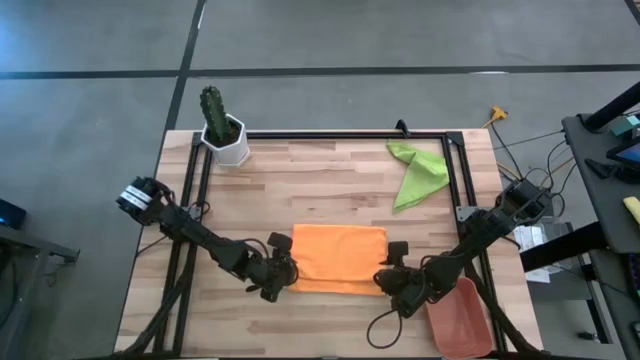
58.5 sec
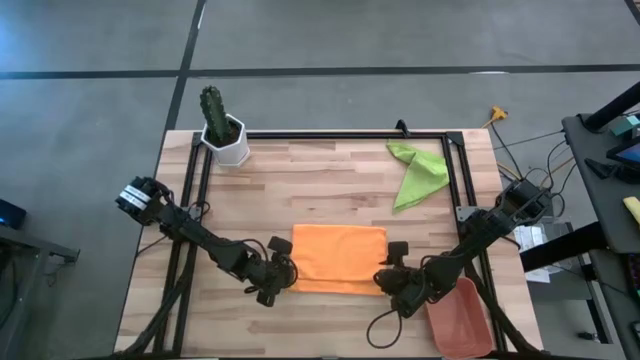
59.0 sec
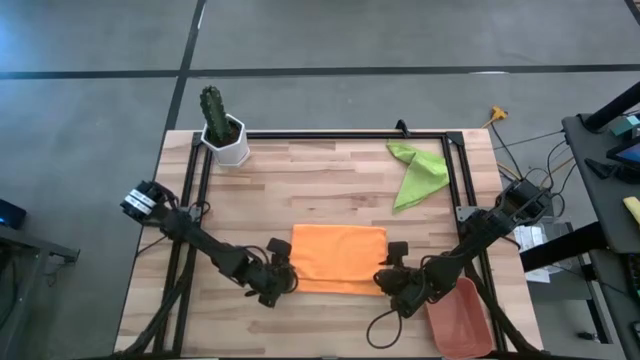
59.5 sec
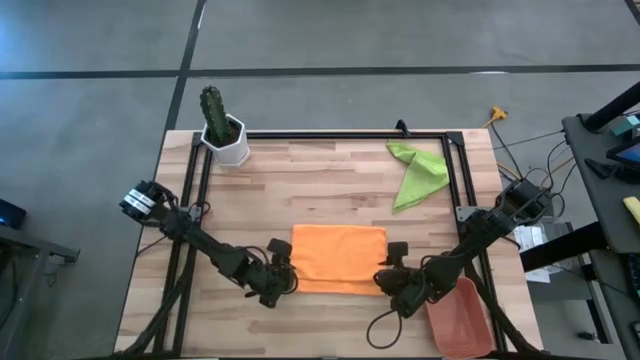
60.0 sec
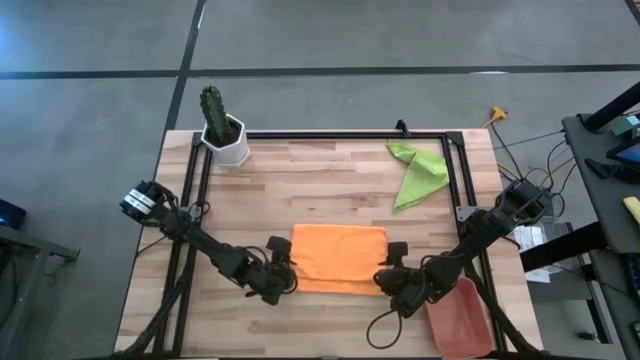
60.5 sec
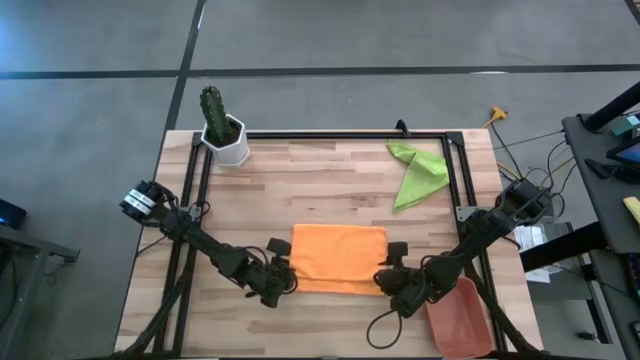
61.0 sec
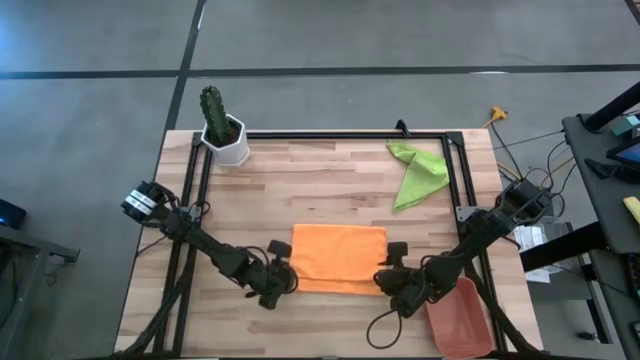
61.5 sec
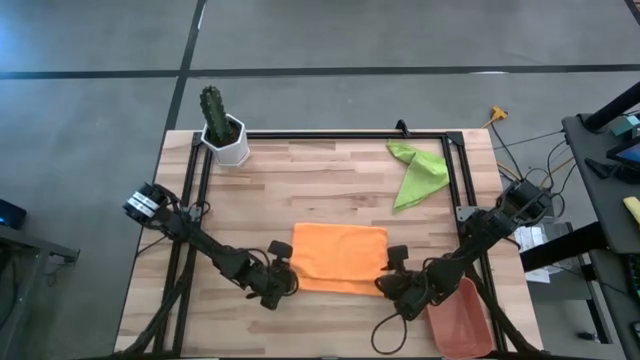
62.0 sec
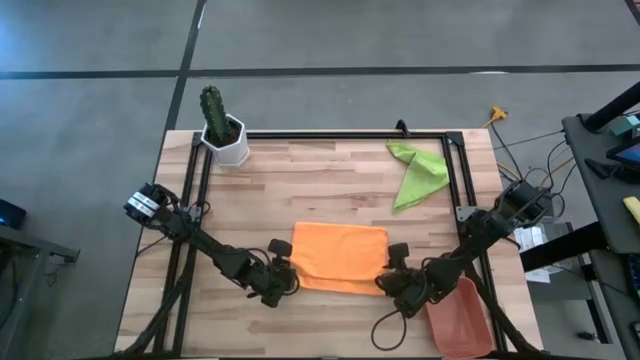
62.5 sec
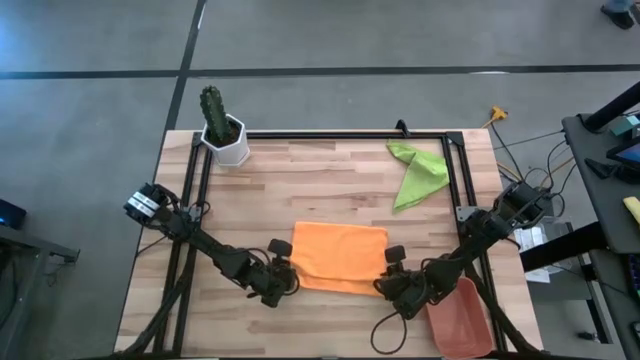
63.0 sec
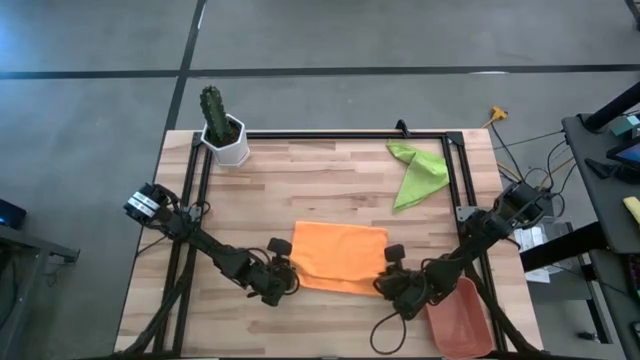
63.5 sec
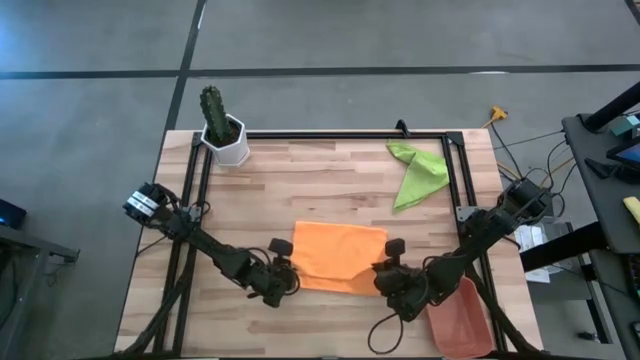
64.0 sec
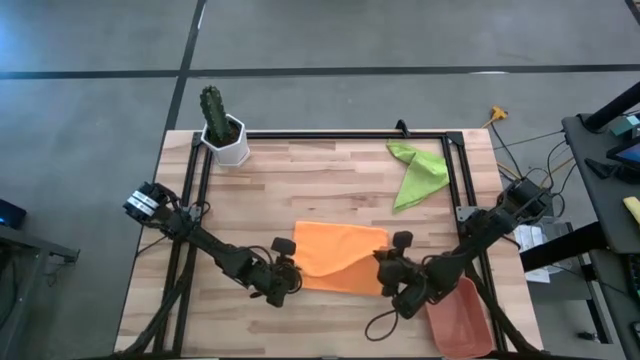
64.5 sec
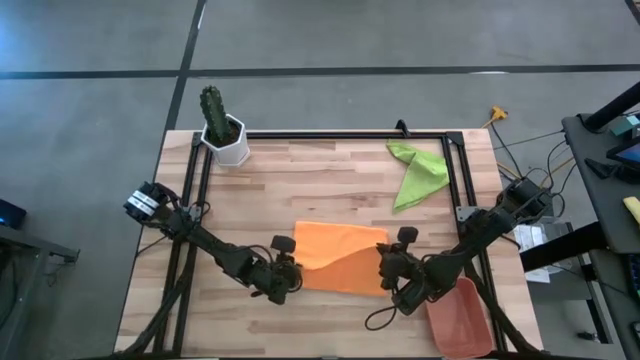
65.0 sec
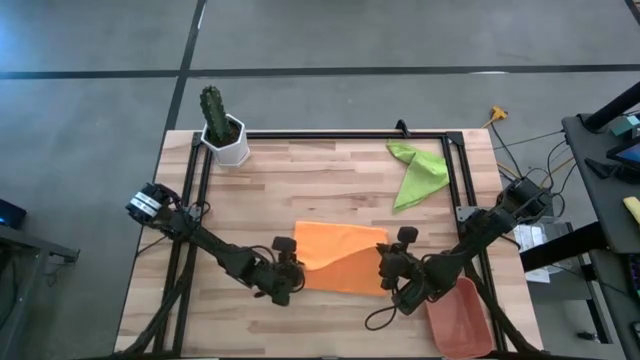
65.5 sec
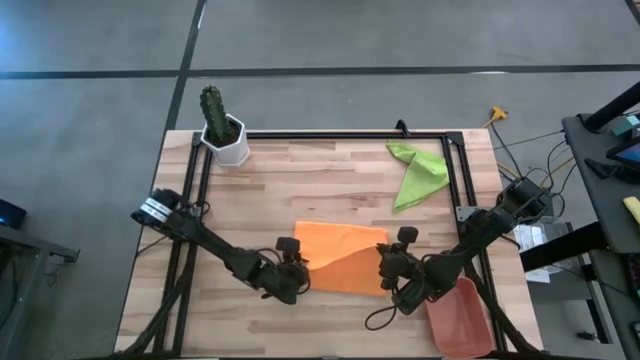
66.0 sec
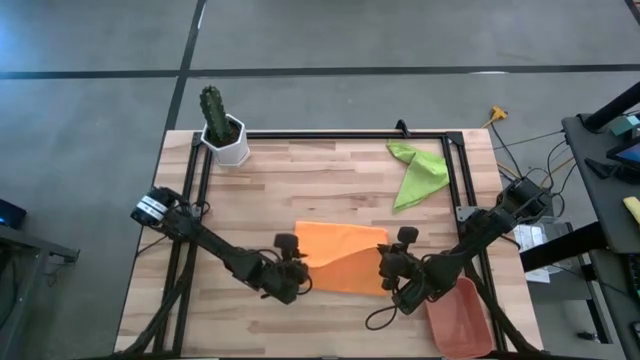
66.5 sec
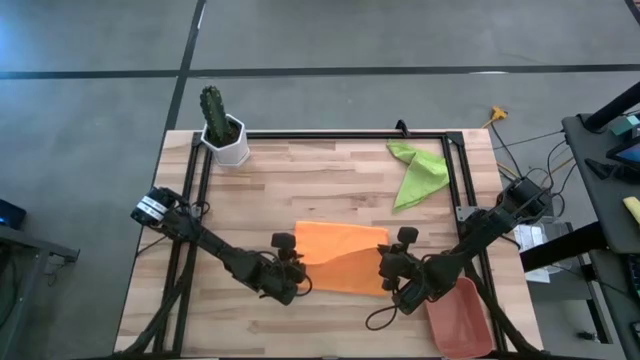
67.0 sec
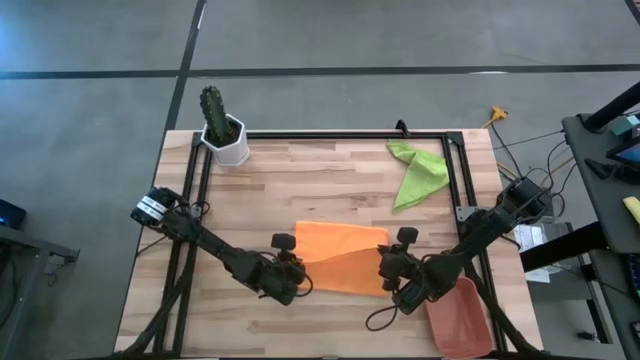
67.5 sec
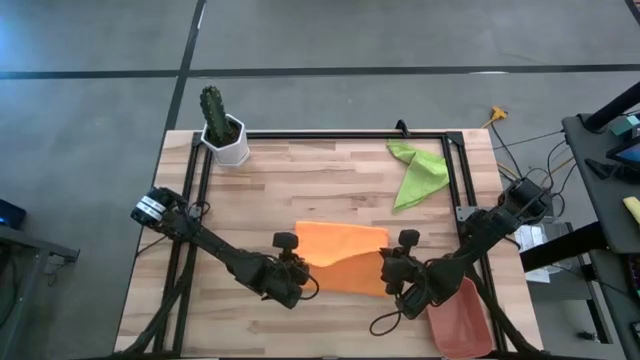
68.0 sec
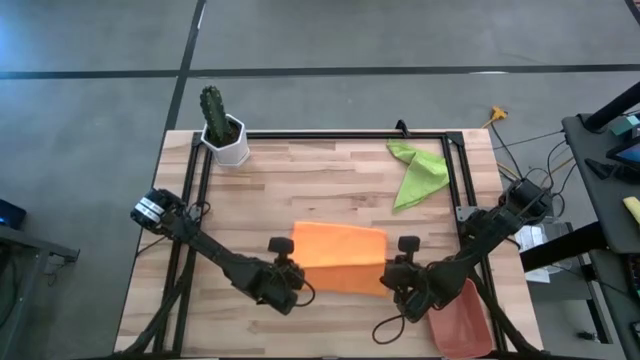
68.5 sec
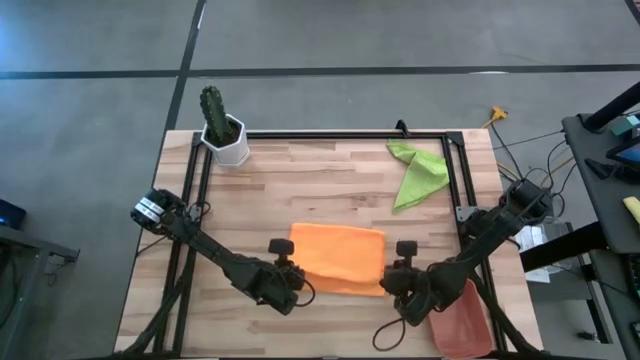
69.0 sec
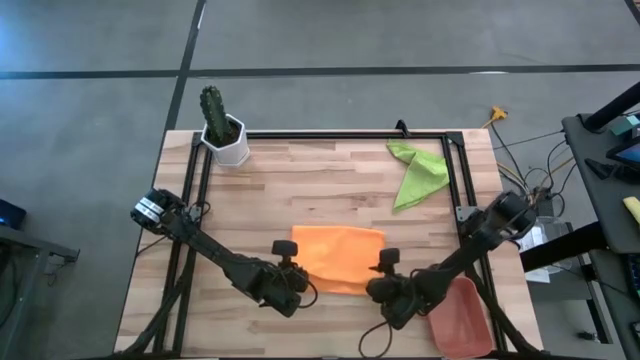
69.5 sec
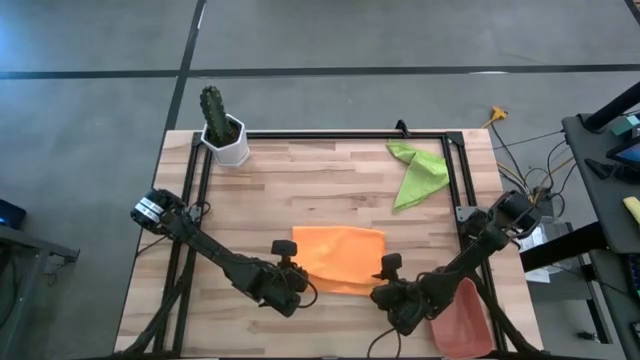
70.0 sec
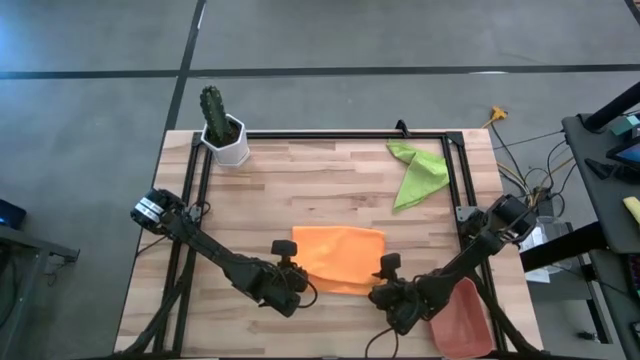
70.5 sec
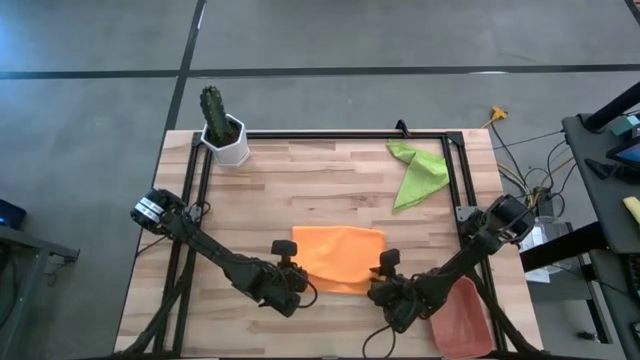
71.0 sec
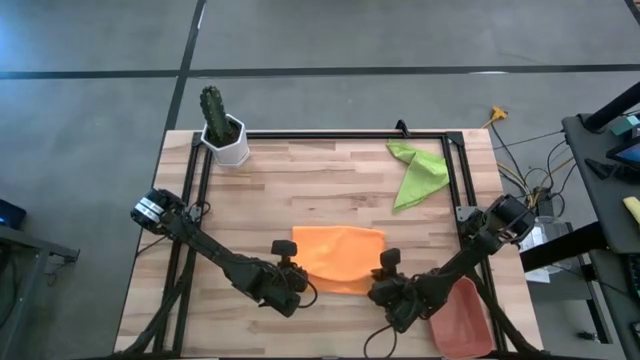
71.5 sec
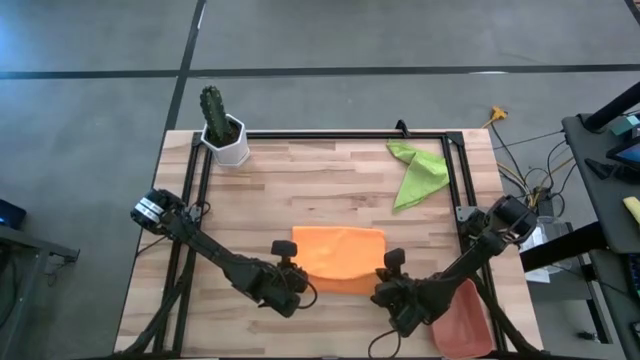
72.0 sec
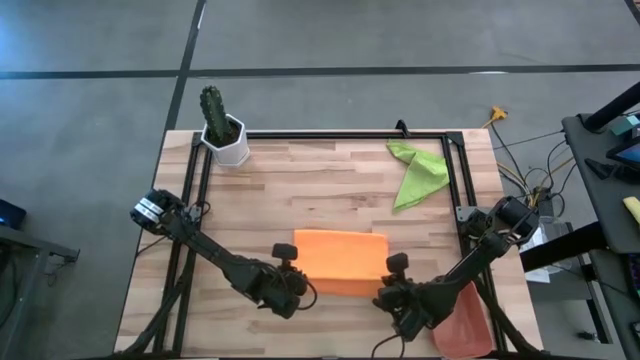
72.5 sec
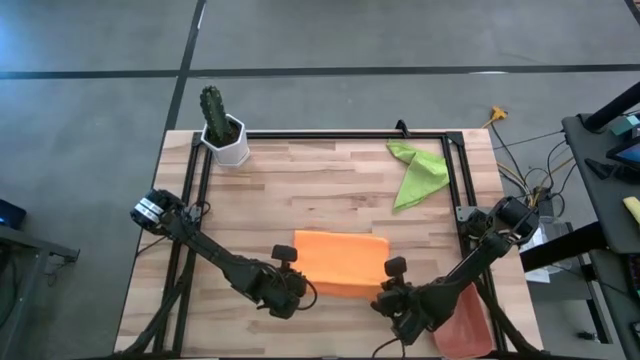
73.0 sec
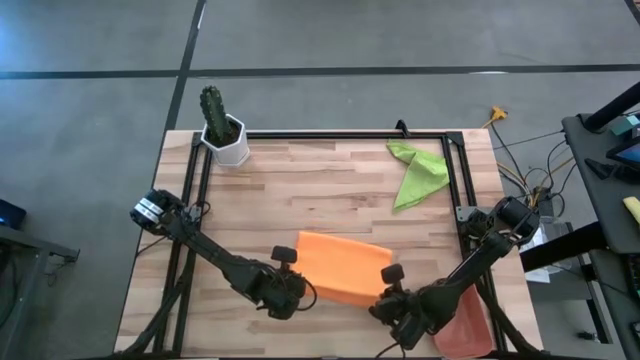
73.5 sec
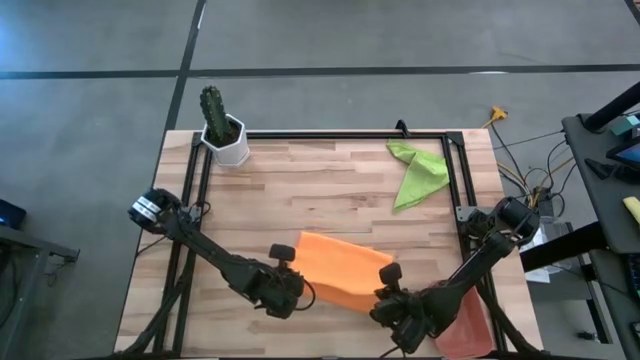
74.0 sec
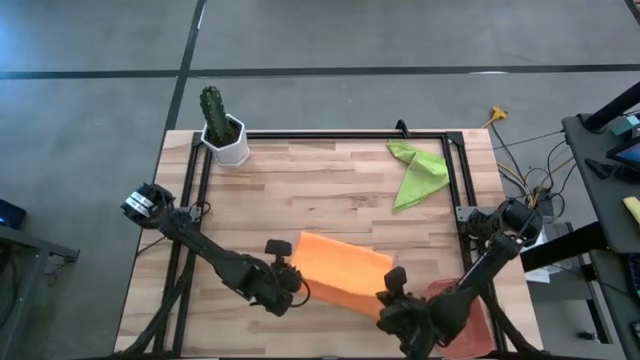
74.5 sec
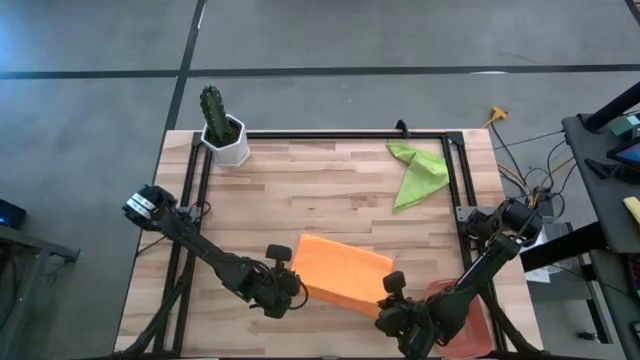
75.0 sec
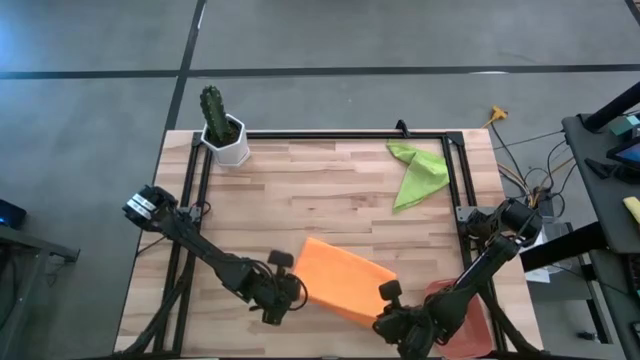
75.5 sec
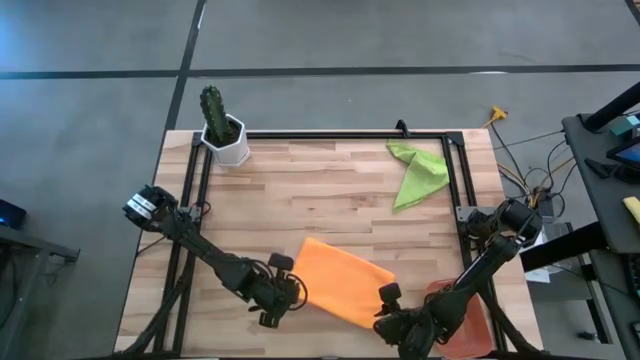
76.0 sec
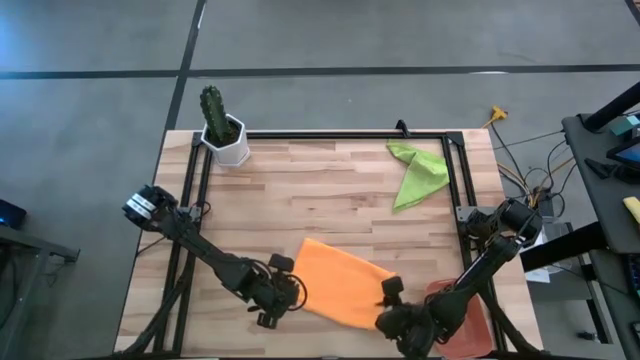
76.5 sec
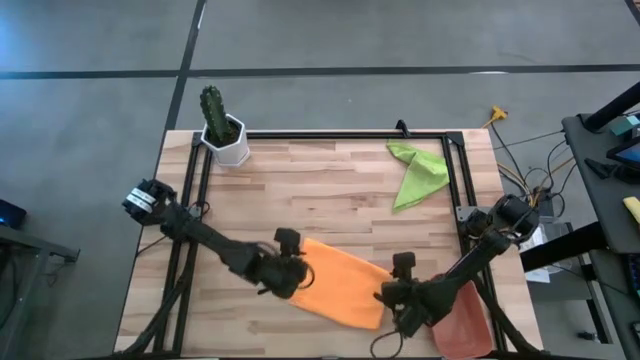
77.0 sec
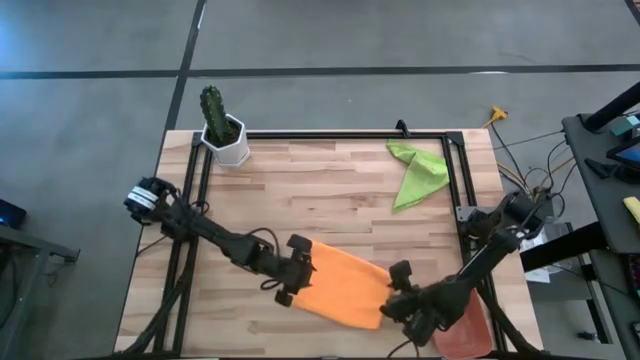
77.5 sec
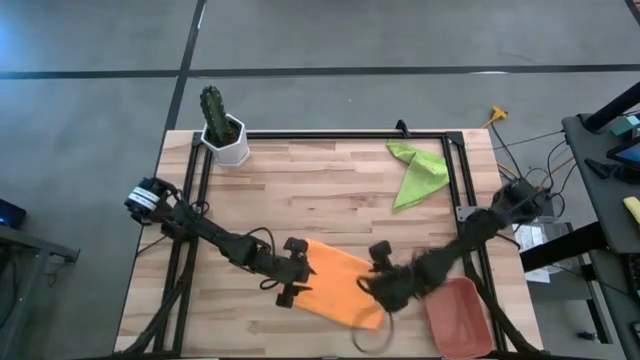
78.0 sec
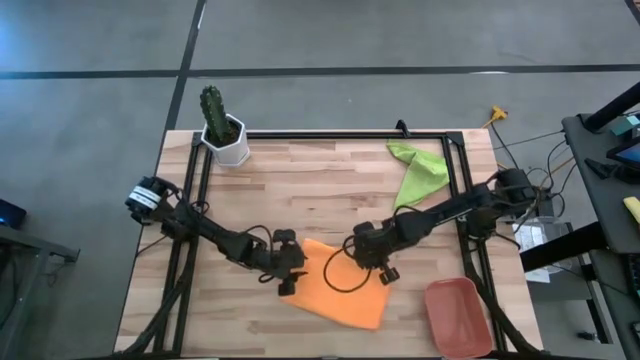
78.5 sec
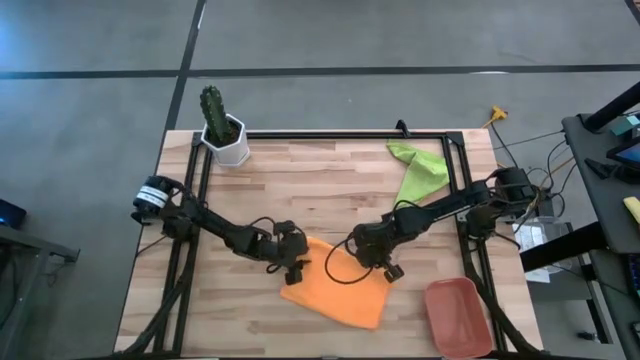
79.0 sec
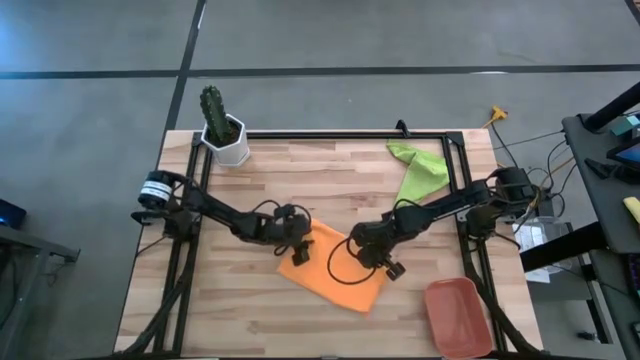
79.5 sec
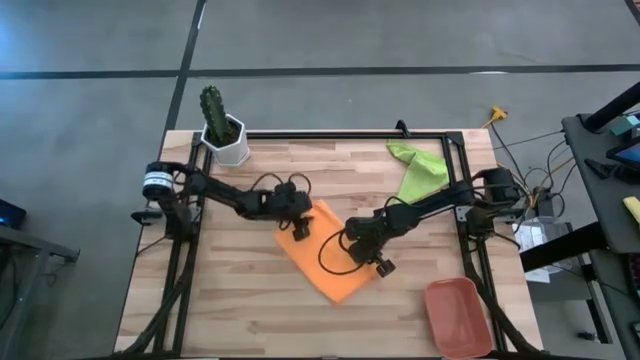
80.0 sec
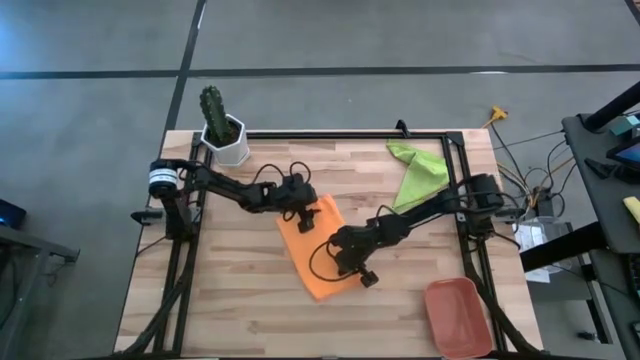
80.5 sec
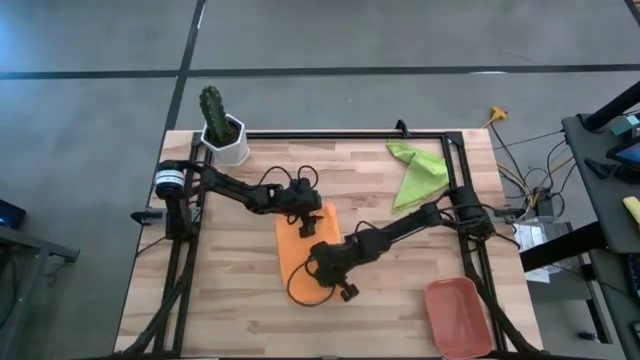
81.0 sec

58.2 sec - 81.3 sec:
Task: Roll microfiber towels into tight, uniform cylinder then place into a basket
Fold the orange microfiber cloth
